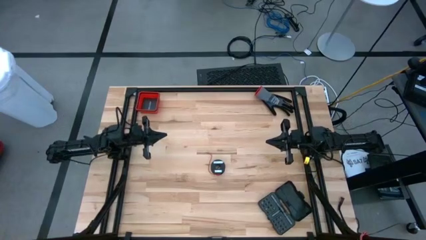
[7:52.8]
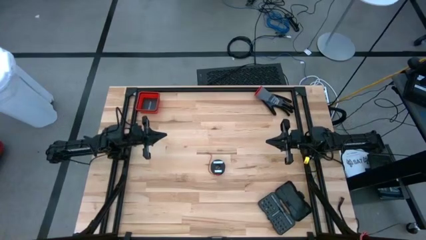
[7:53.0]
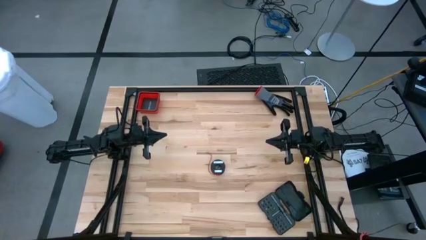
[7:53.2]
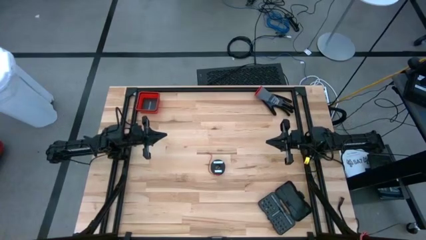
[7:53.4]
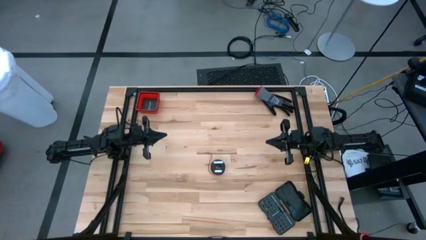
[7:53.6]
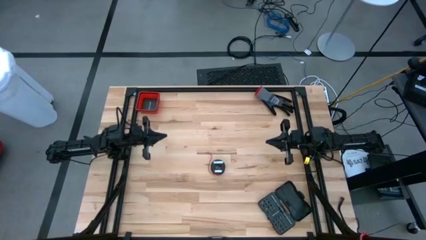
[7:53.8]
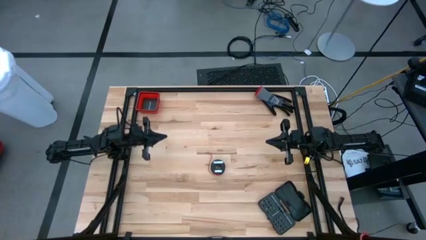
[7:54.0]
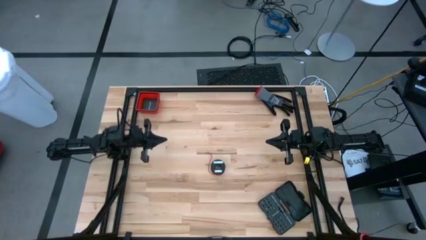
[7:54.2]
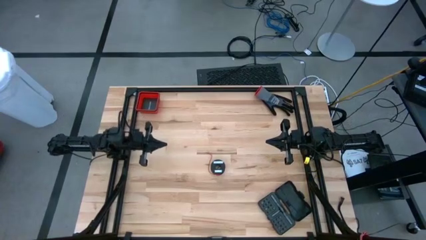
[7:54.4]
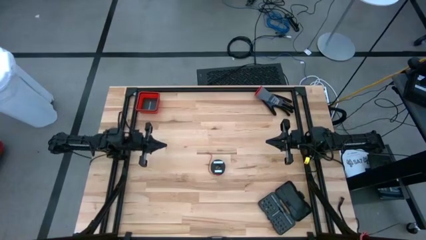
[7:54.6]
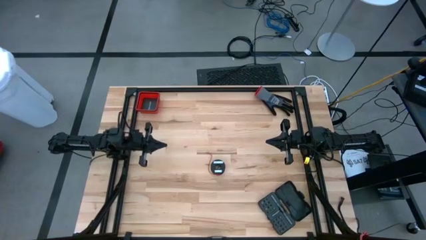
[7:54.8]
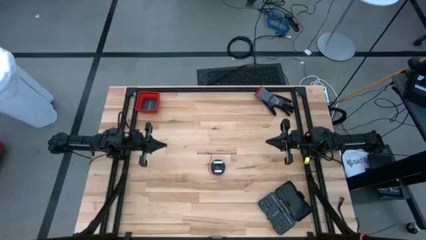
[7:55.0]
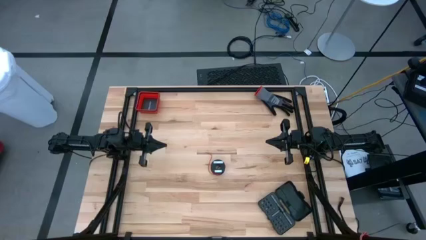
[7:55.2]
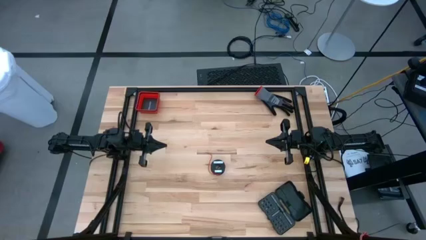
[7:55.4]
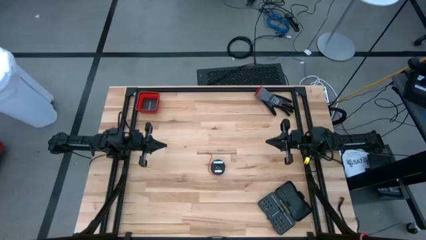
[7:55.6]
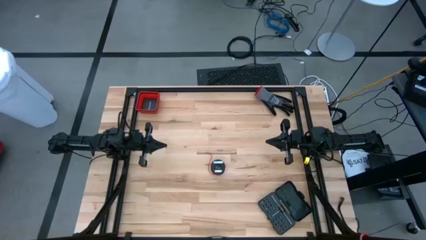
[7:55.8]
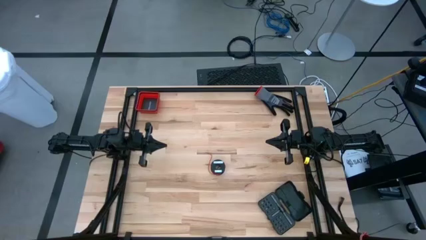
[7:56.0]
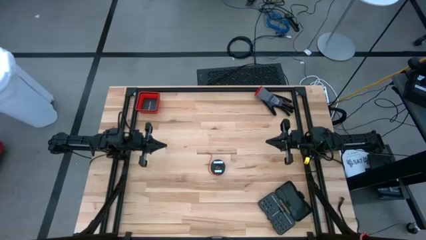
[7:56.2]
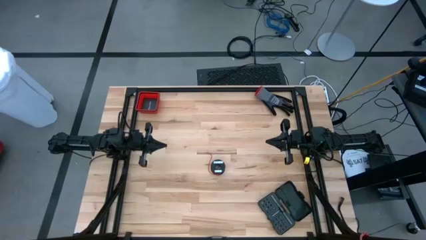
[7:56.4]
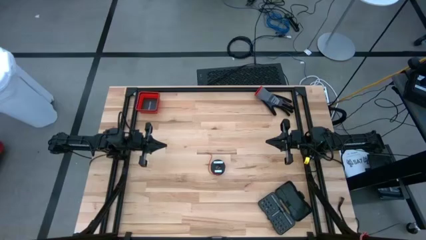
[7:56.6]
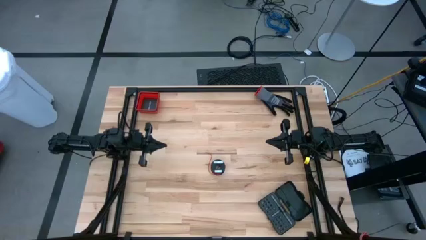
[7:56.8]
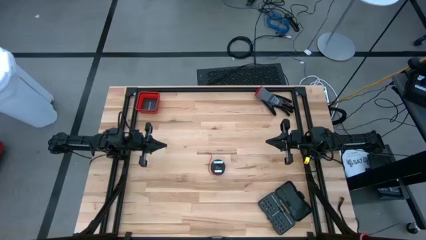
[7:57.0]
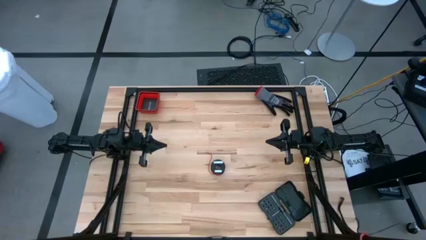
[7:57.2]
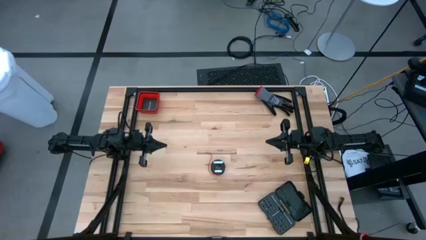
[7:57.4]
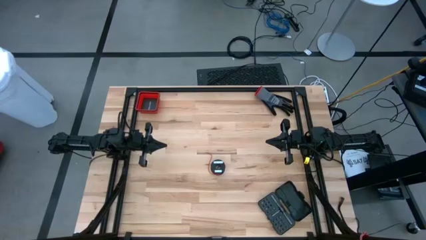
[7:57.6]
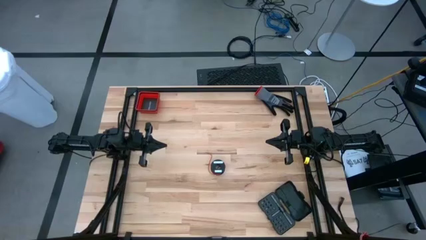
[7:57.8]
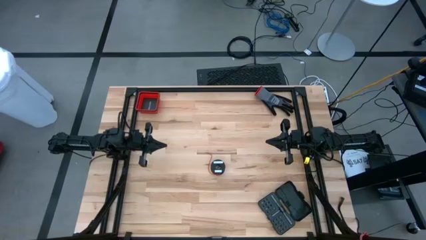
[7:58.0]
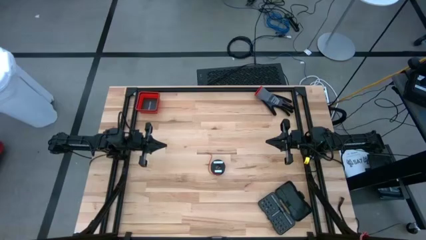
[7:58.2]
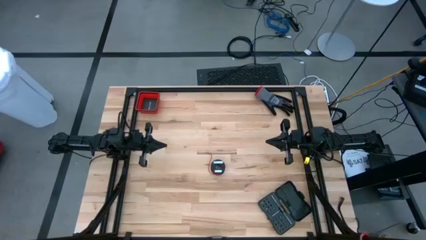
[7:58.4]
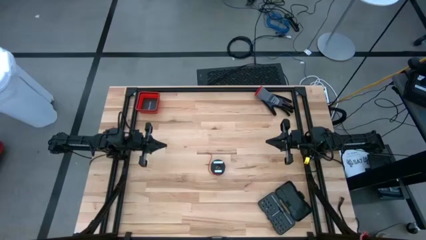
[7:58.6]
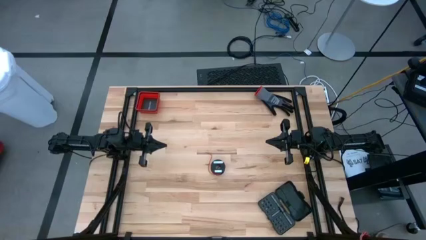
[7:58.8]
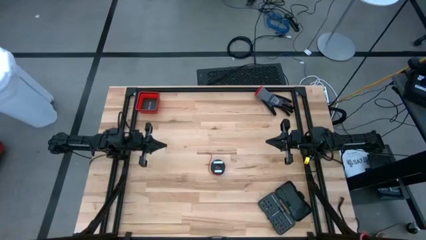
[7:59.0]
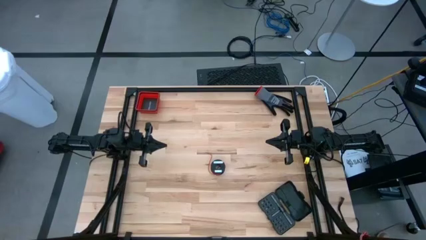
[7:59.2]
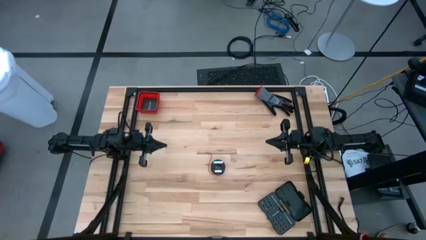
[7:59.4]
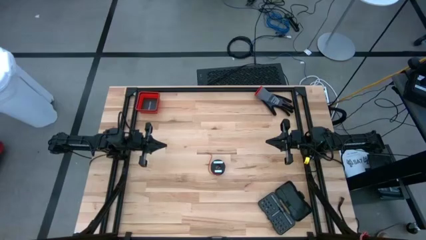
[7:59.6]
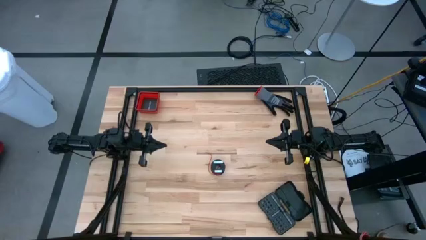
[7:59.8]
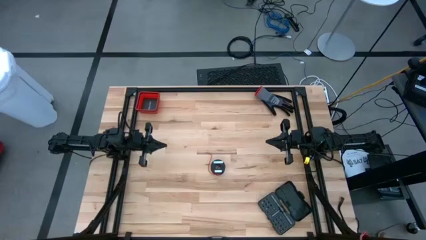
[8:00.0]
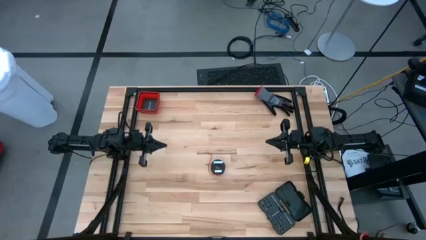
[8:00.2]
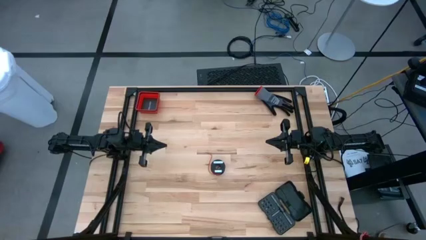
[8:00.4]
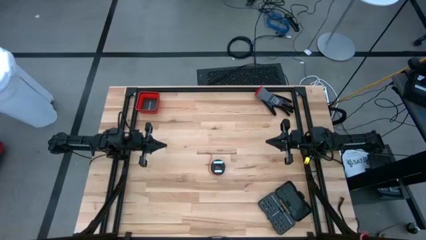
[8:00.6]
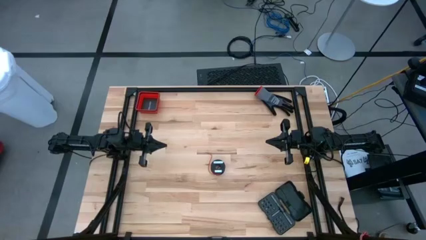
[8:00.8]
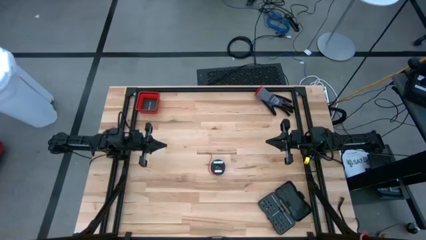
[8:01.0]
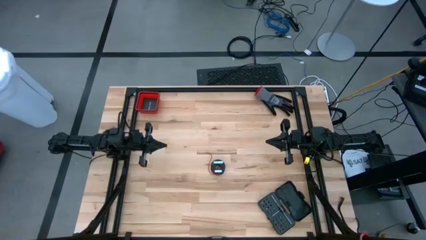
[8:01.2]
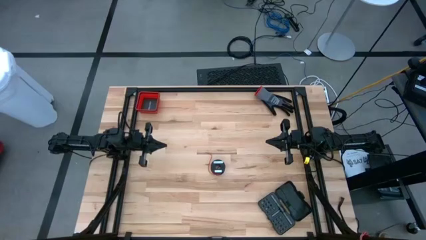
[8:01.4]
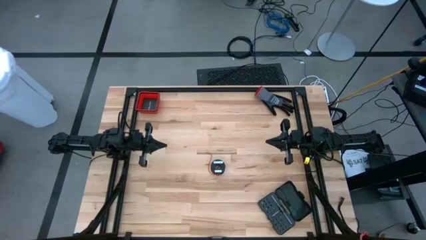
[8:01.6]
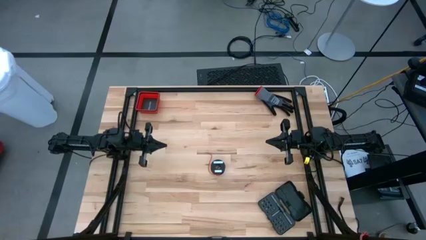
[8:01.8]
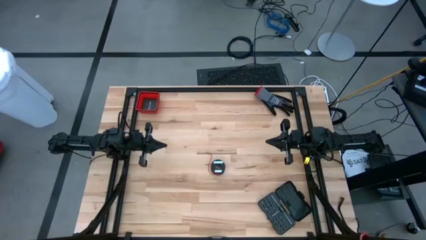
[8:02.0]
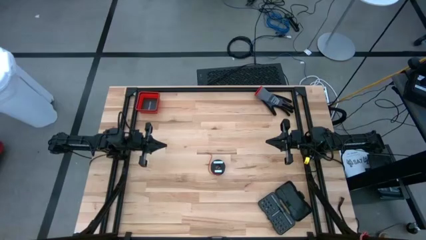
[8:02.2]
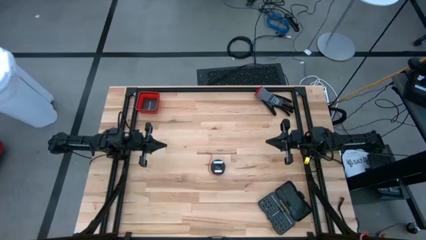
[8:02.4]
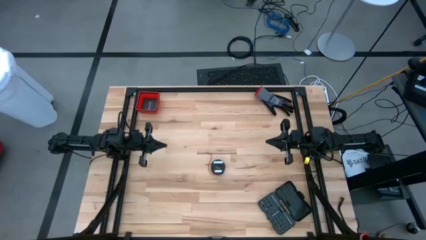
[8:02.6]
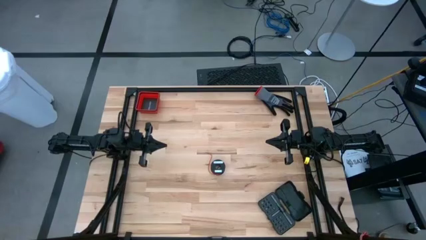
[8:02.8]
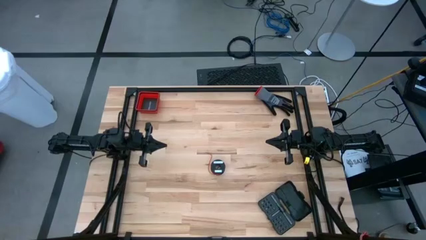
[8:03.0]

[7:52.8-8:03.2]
Task: Coil cords
Return to Home Position
